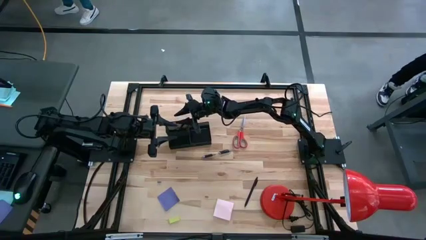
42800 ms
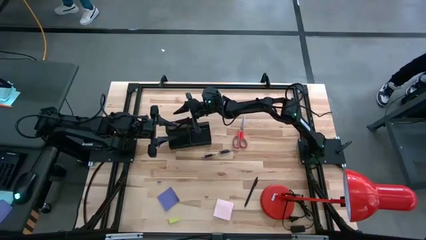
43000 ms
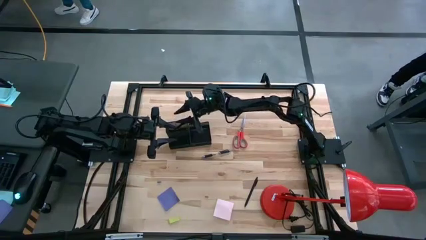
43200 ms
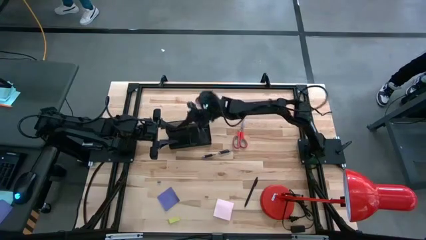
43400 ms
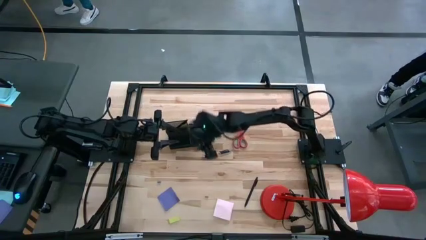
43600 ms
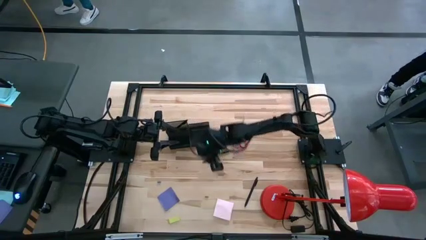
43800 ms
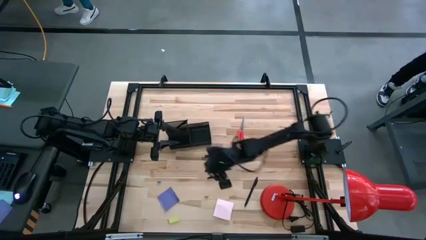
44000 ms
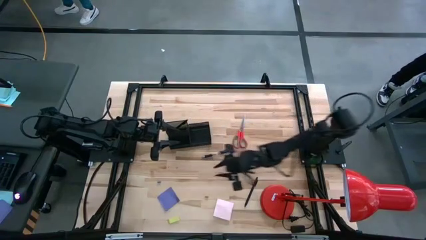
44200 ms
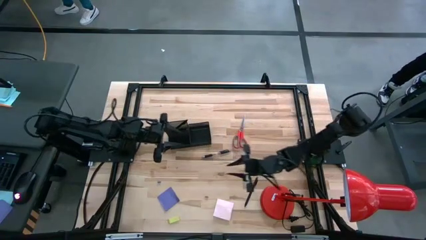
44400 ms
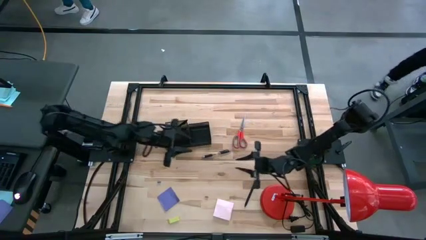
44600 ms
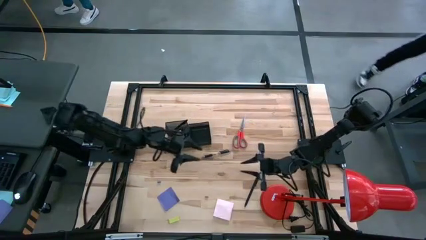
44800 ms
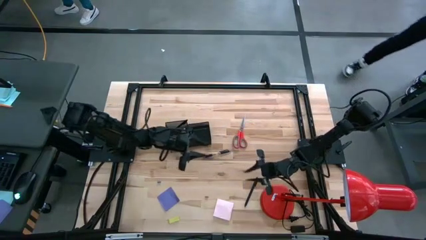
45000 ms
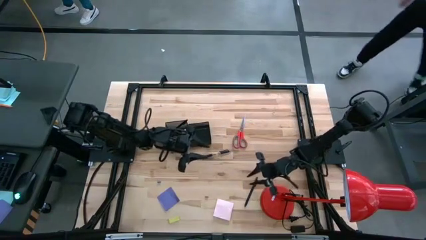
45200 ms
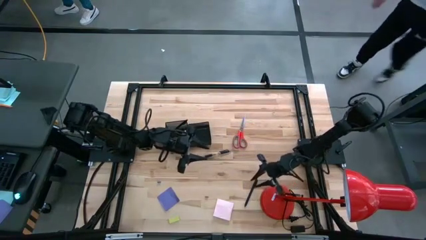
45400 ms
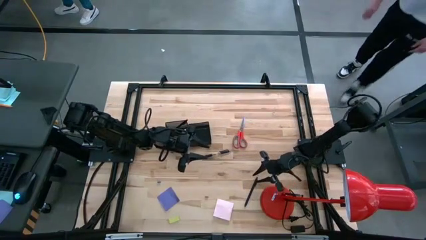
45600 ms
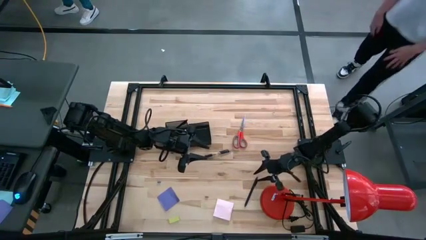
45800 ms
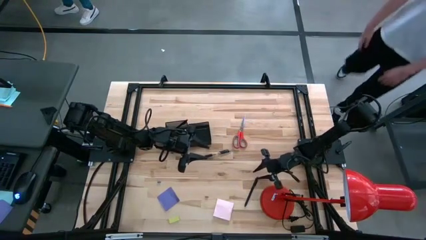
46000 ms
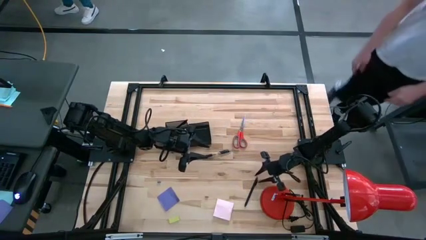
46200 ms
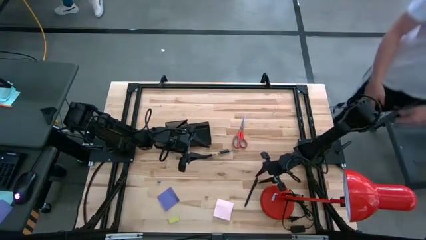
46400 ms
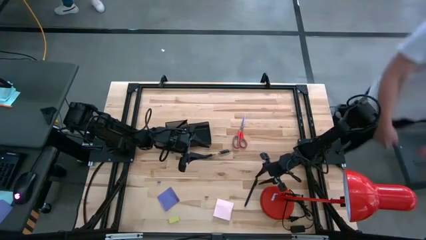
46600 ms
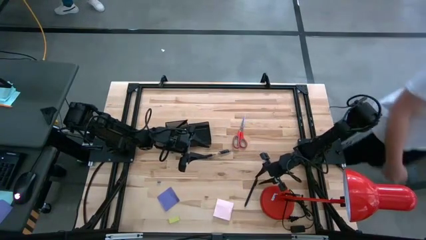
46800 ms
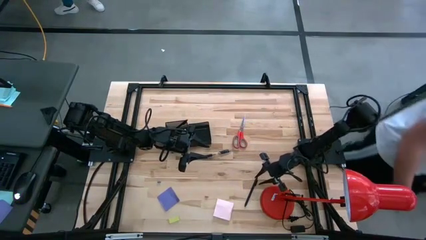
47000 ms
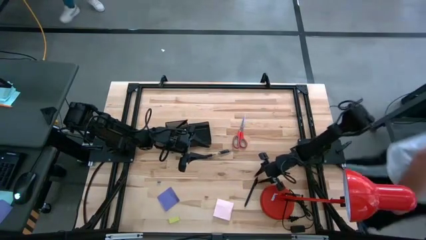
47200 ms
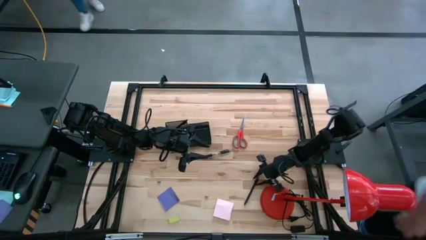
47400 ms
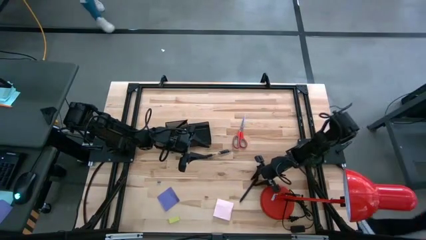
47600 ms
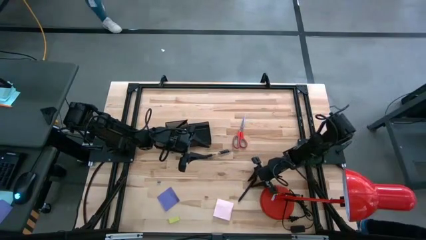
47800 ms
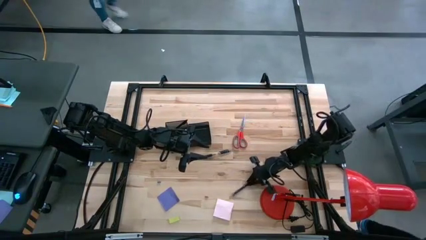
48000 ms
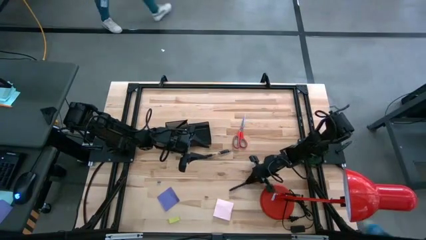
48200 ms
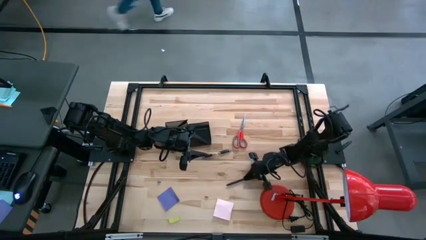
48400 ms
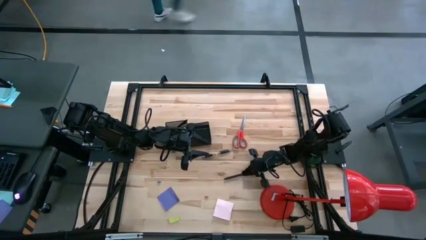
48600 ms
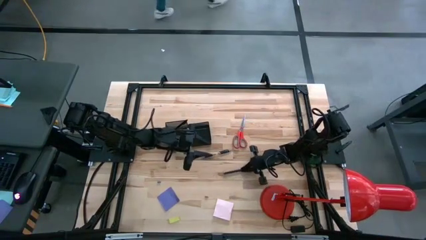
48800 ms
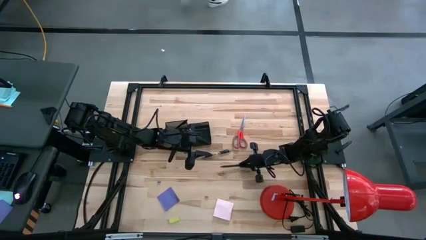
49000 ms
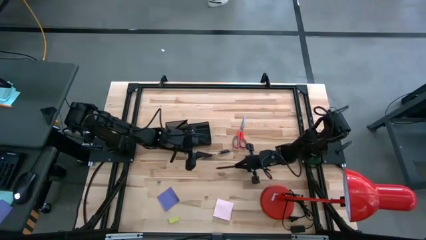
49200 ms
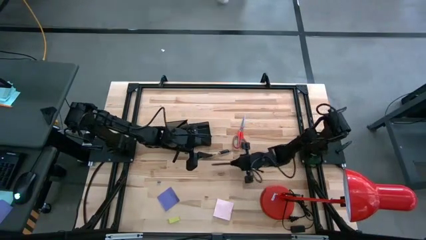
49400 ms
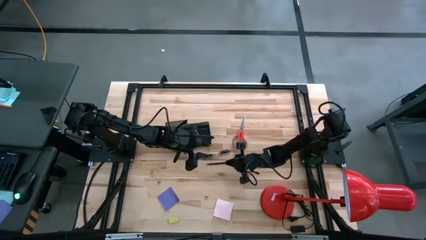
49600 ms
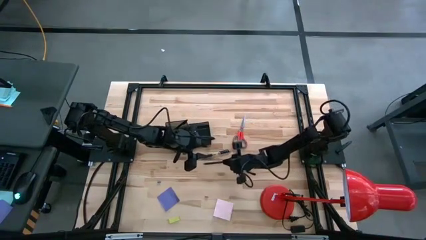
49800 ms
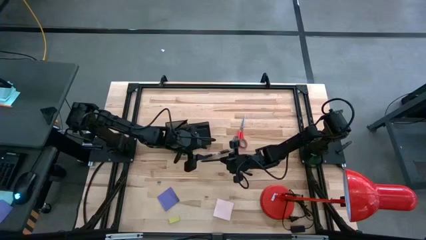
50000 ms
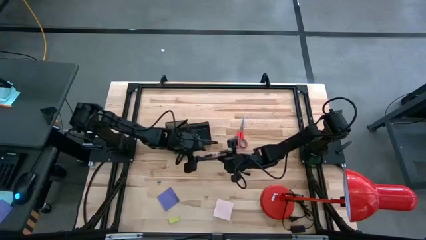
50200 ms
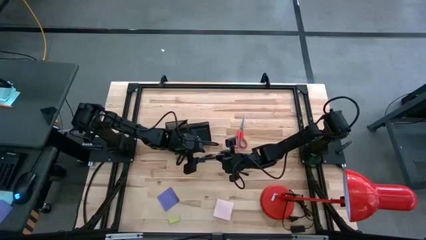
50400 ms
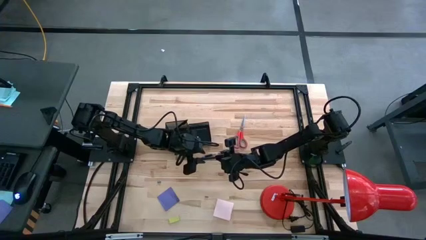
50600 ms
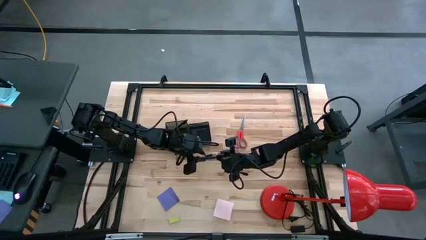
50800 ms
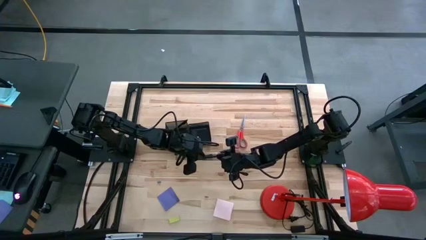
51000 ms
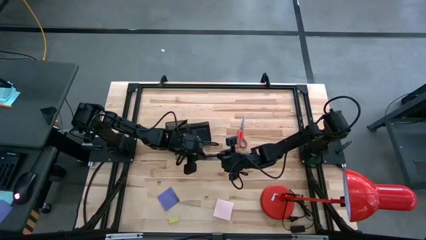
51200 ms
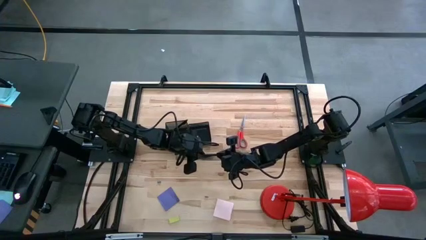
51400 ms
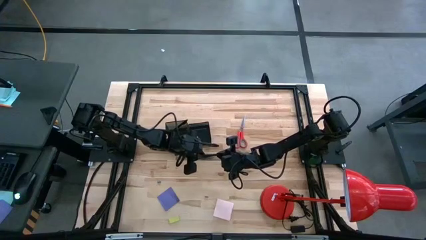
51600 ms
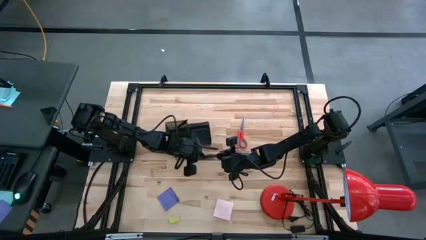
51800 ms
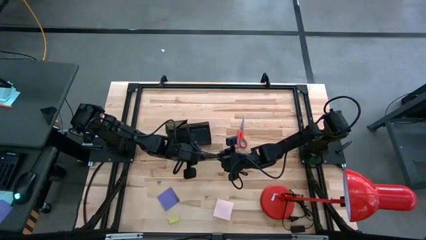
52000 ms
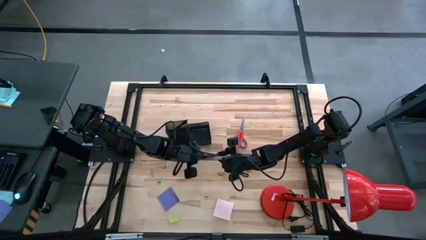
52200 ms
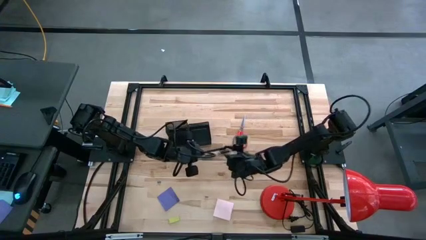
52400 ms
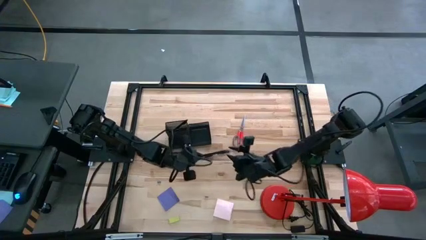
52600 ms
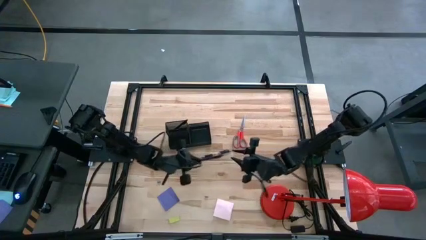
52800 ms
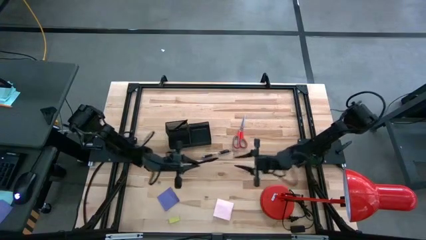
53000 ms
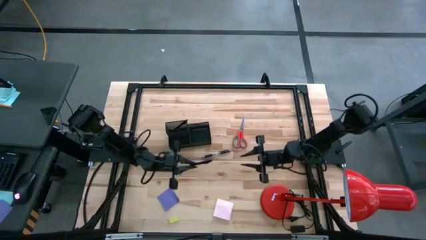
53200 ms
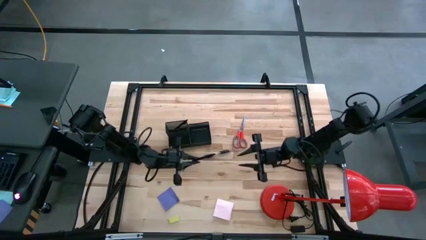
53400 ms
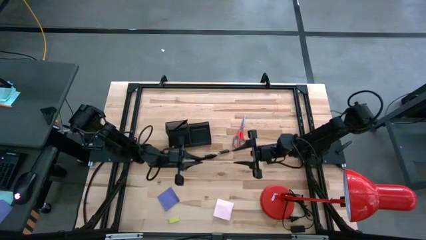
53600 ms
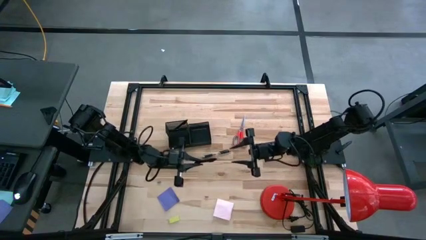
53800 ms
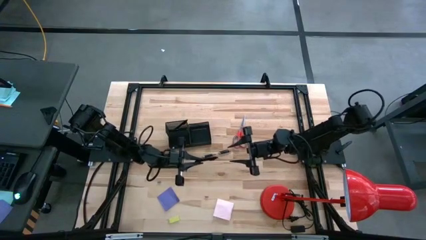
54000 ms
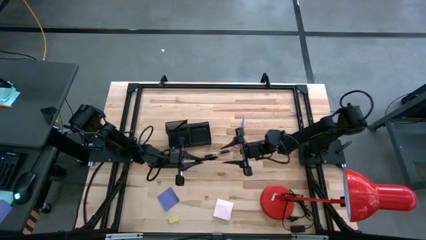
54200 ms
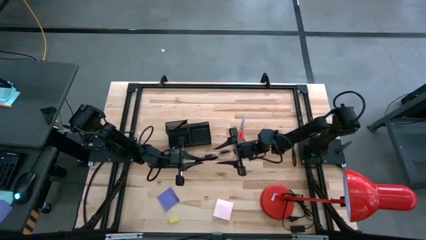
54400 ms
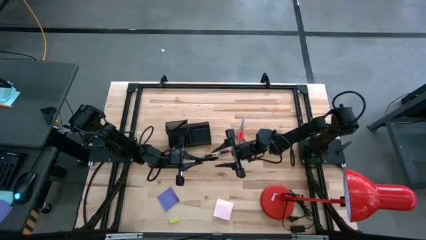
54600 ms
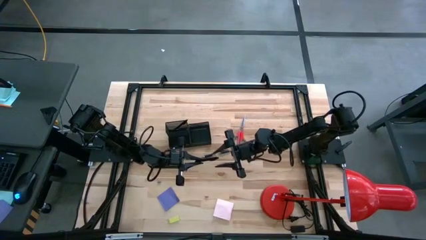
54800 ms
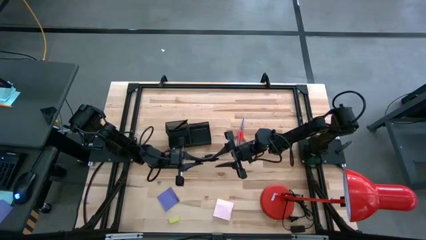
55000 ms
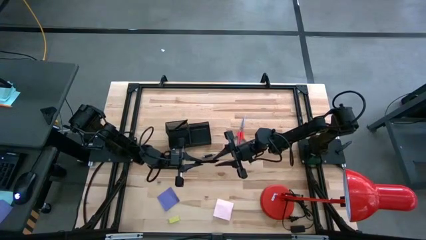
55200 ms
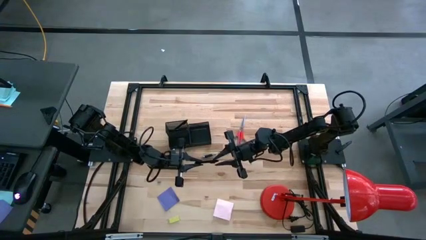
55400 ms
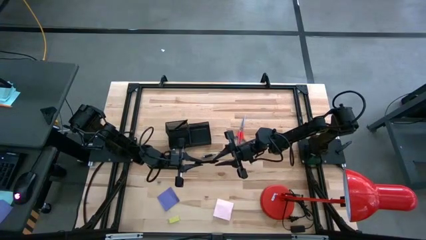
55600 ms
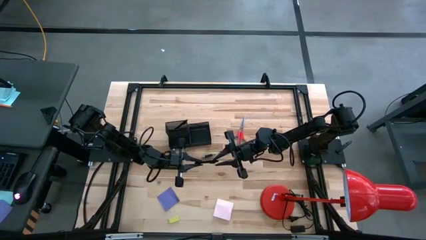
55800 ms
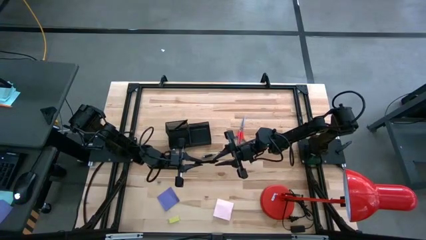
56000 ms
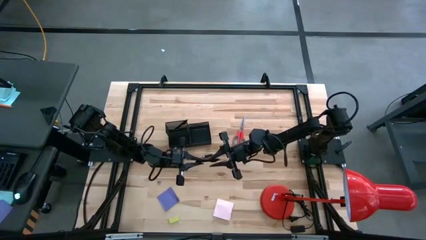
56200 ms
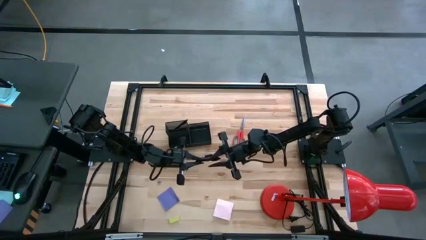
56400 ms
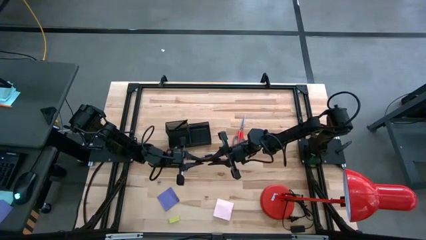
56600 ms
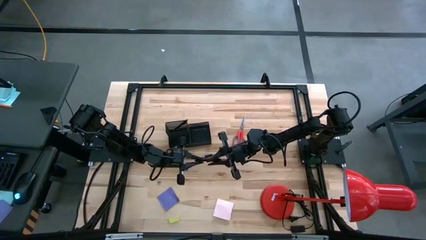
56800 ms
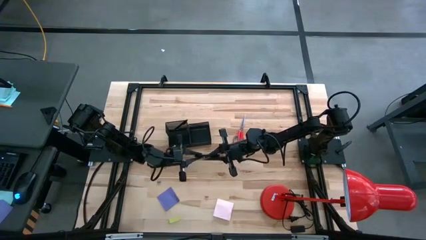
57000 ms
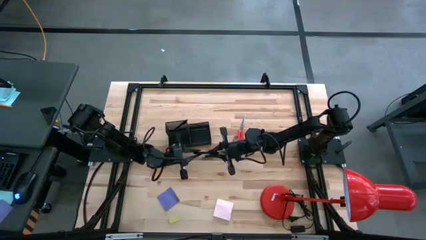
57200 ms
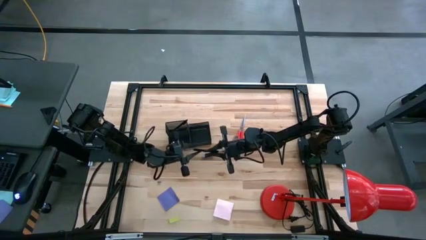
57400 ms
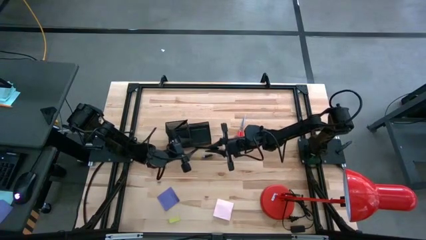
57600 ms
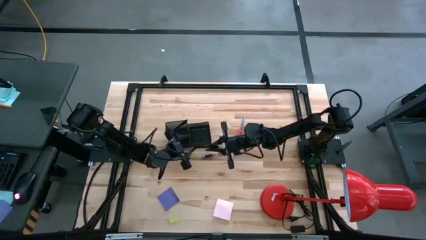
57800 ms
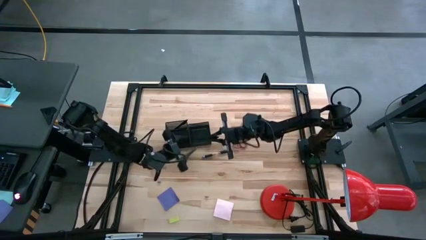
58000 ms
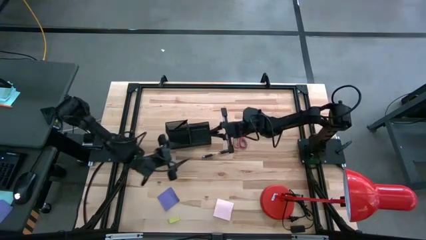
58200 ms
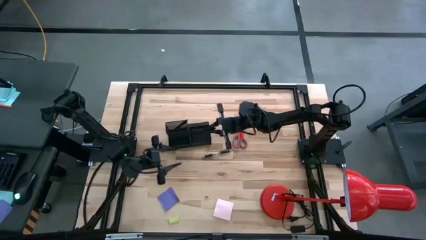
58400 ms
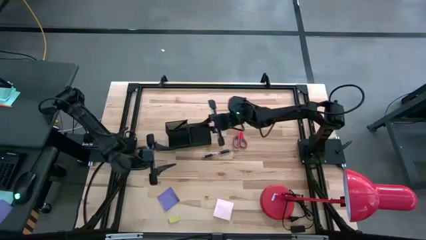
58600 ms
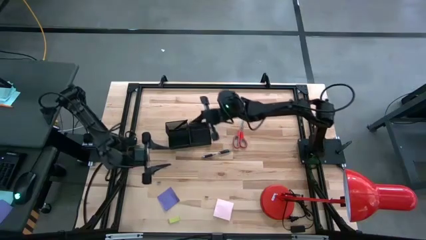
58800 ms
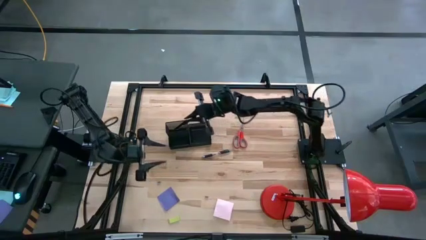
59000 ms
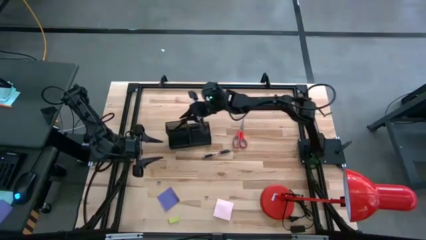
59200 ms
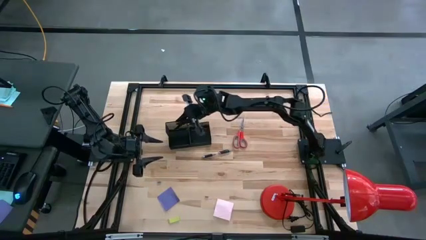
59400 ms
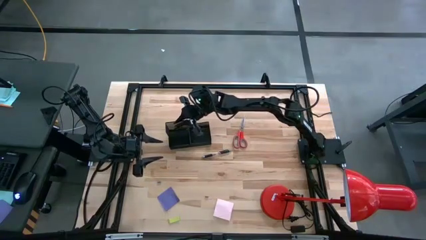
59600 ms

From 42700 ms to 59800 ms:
Task: Pick and place office supplies into organizer
Put the pen black into the desk organizer
